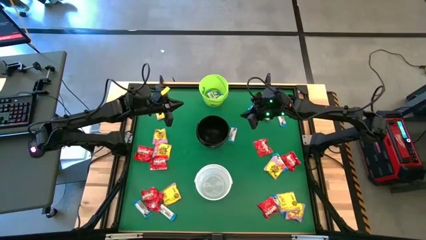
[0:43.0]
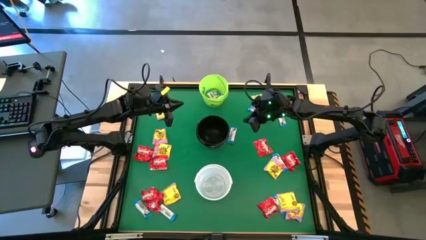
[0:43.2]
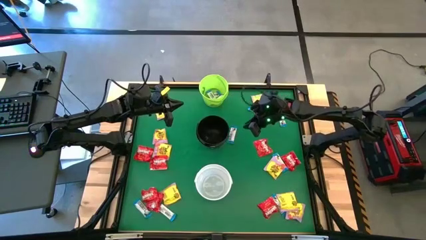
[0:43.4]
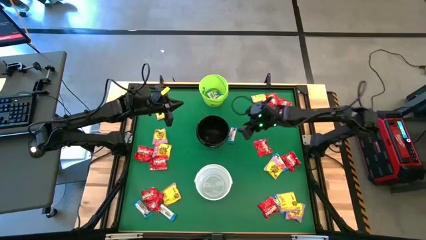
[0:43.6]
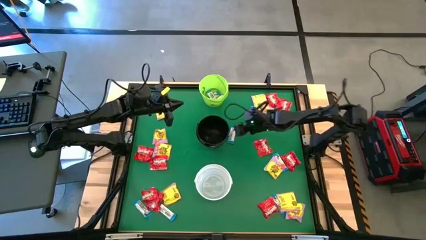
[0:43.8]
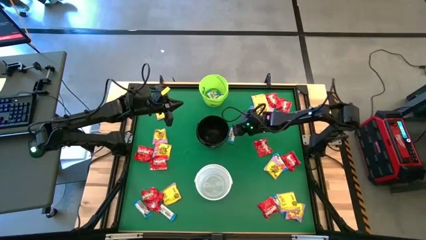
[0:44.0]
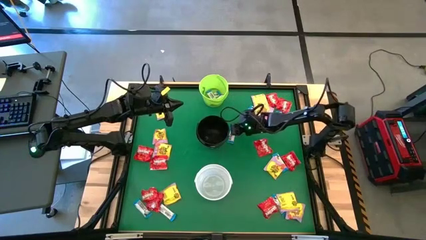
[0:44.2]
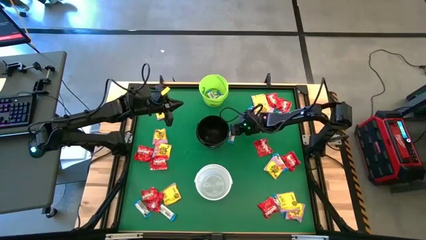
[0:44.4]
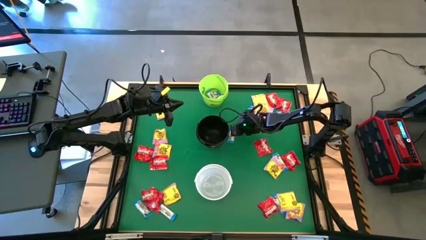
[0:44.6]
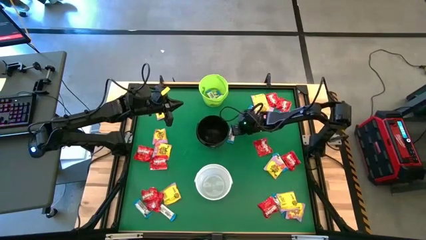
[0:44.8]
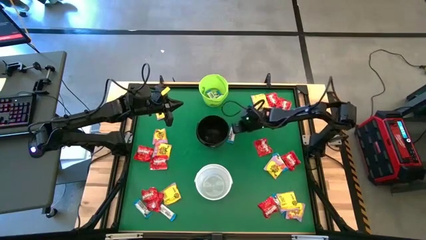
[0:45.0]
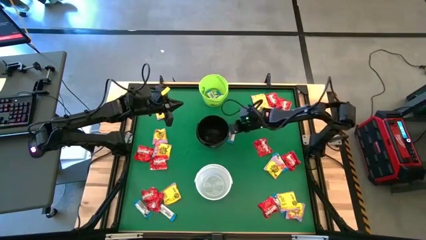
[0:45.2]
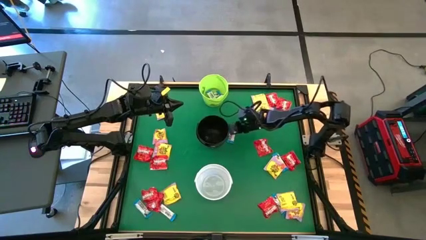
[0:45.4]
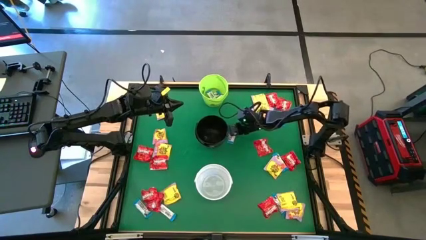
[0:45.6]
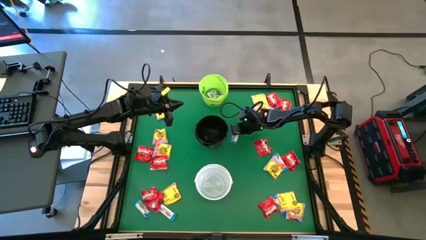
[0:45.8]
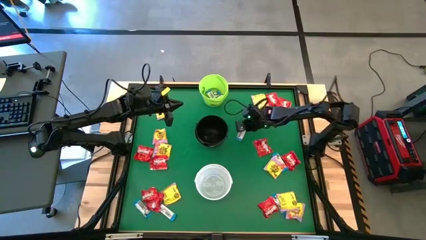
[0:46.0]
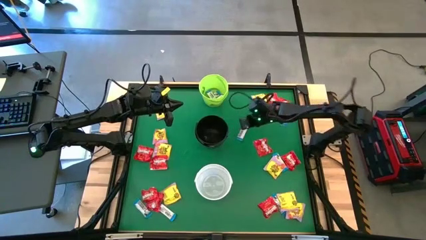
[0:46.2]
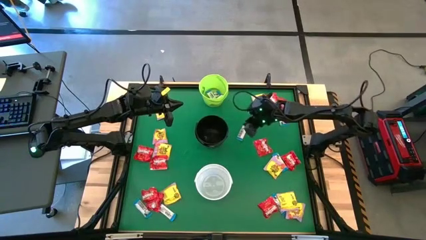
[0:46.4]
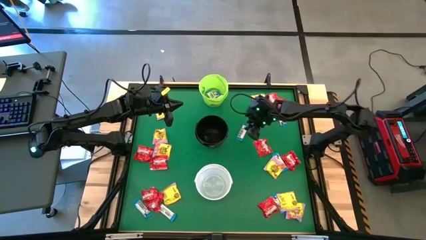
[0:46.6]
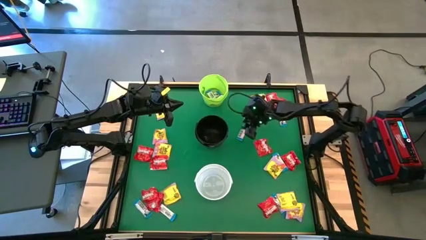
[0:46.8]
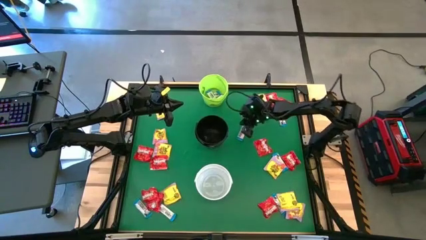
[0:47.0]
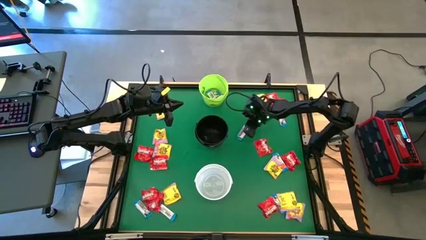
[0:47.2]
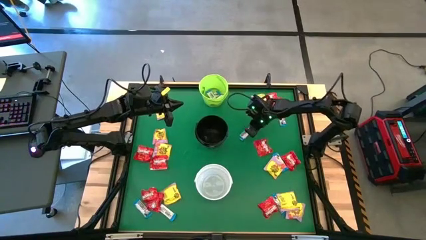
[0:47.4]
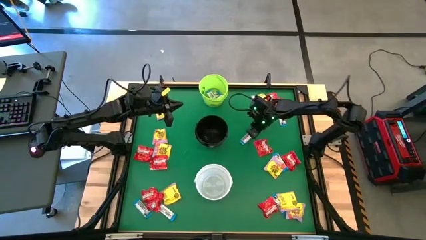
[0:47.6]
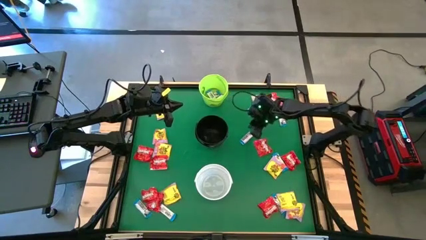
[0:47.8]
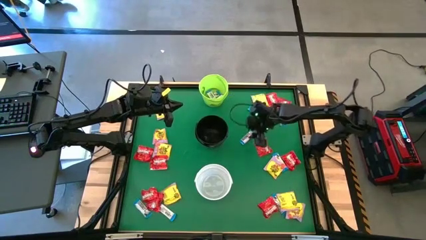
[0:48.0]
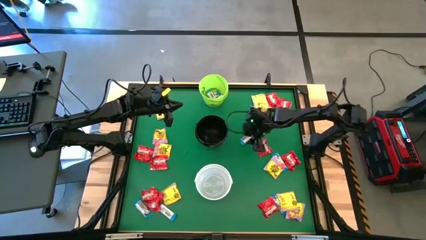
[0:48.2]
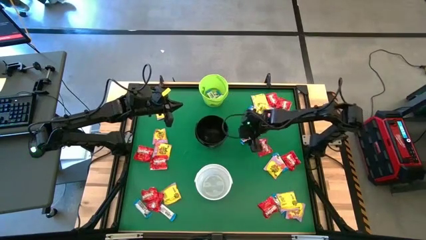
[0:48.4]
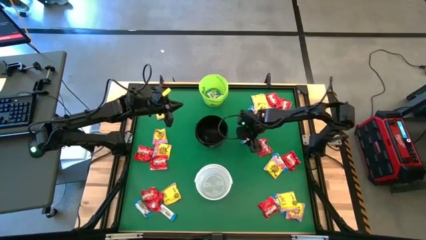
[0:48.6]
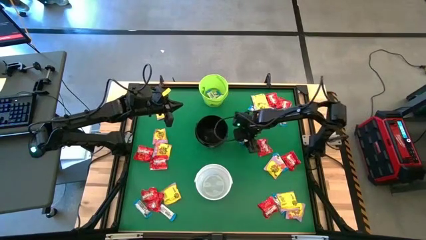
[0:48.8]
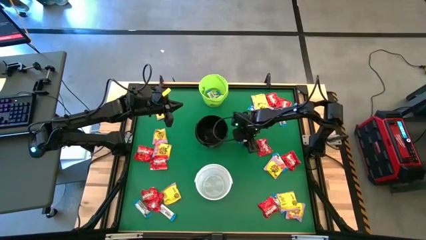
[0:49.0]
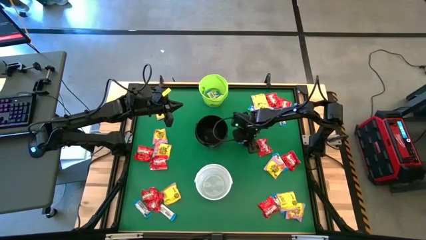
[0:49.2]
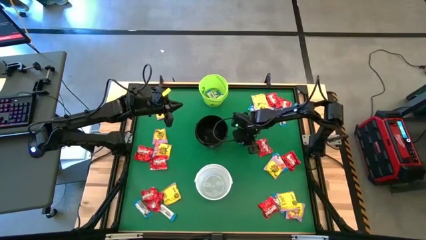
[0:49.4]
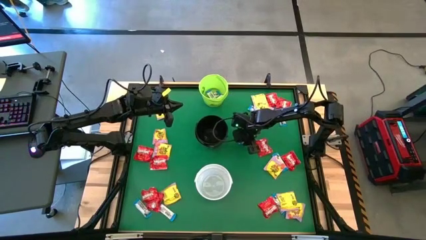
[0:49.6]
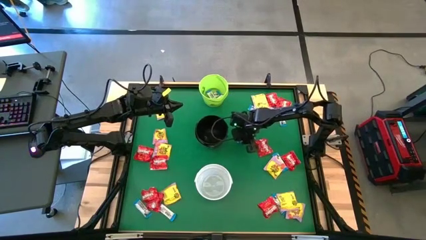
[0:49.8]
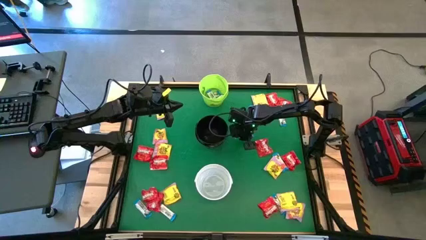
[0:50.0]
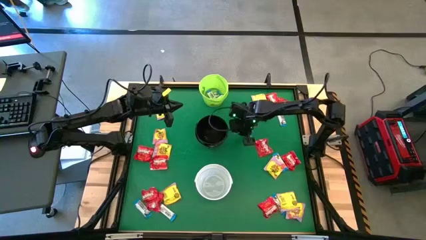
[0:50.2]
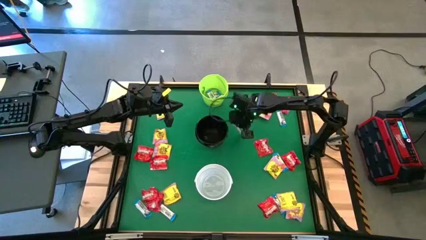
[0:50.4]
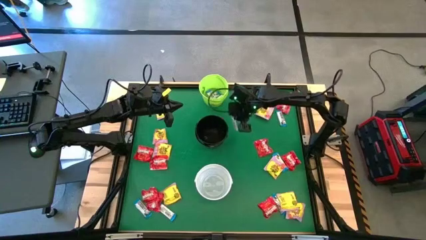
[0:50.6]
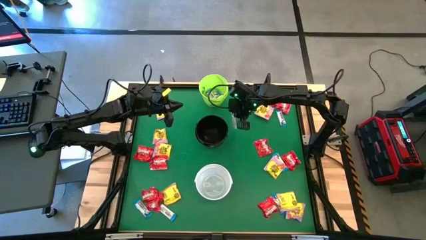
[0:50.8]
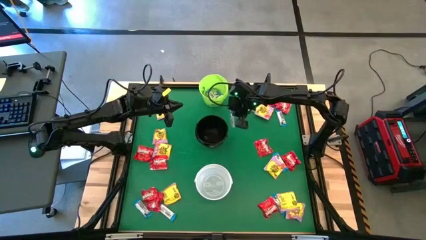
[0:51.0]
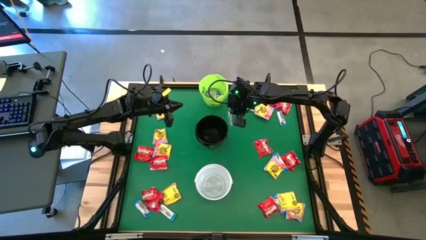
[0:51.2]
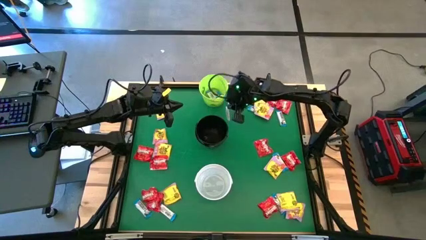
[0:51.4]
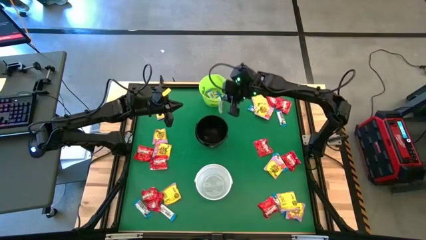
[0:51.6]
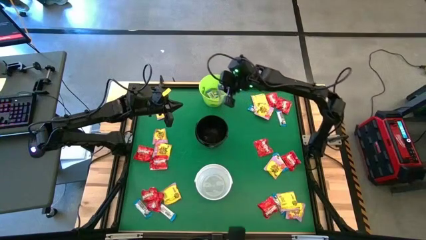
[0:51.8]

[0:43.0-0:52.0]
Task: Sort candy by brand, put in halloween buckets
Put the white chocolate into the green bucket

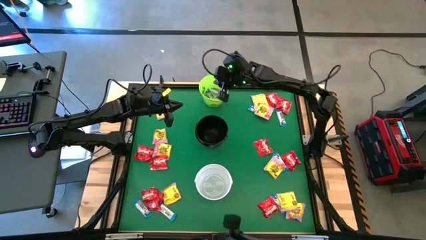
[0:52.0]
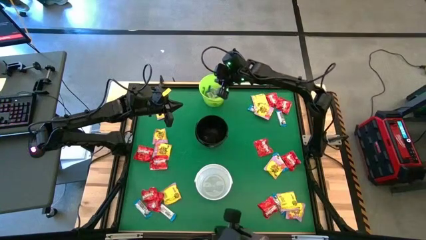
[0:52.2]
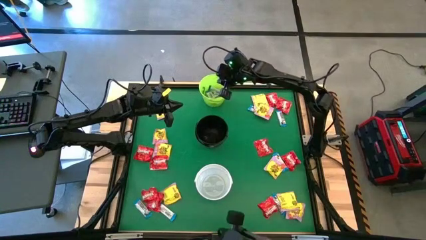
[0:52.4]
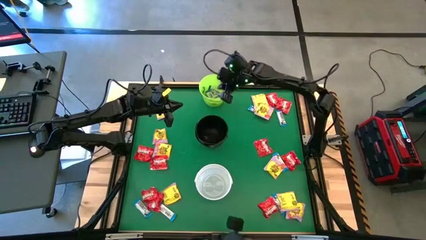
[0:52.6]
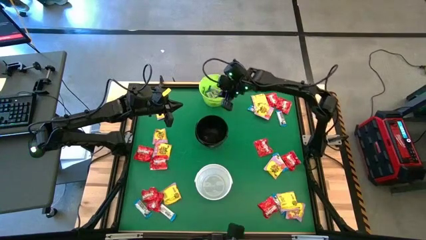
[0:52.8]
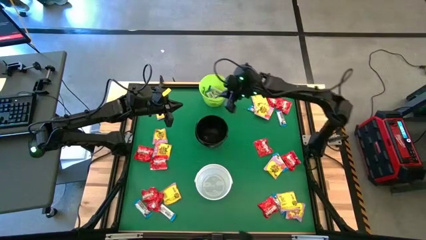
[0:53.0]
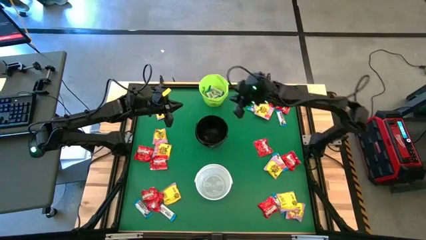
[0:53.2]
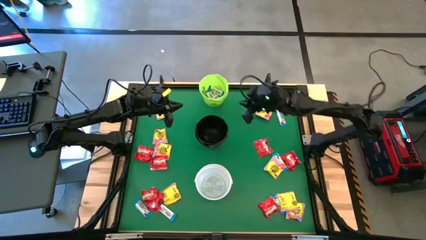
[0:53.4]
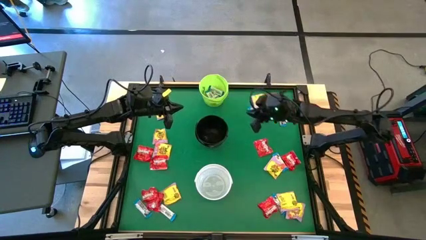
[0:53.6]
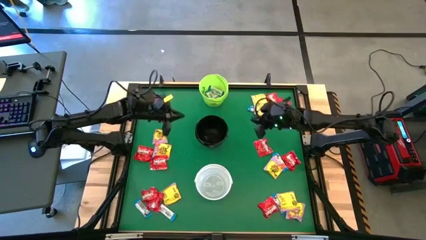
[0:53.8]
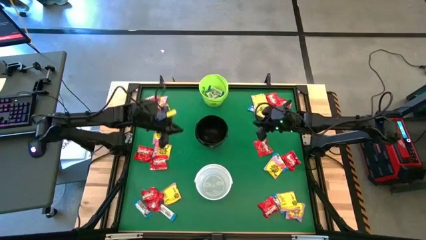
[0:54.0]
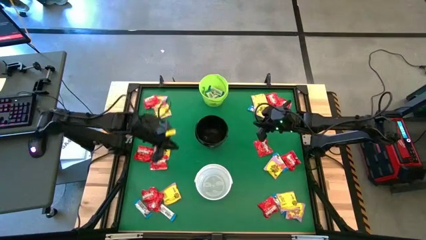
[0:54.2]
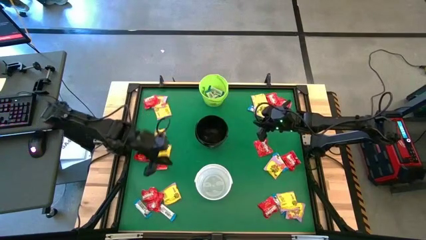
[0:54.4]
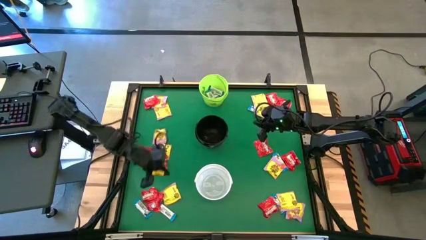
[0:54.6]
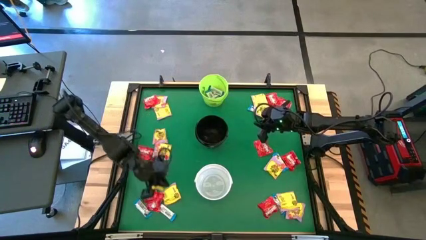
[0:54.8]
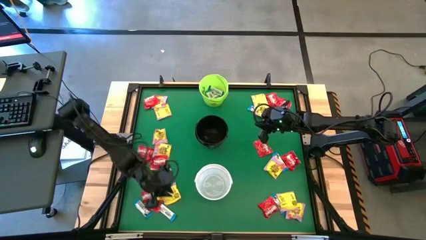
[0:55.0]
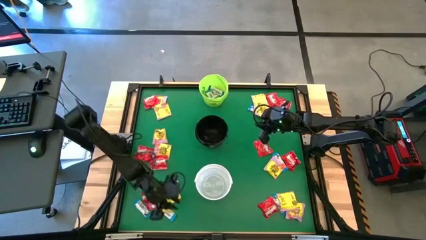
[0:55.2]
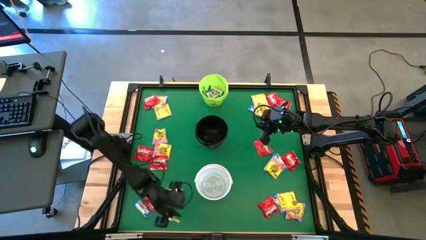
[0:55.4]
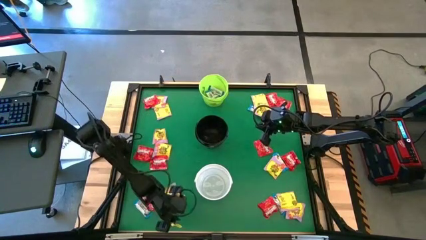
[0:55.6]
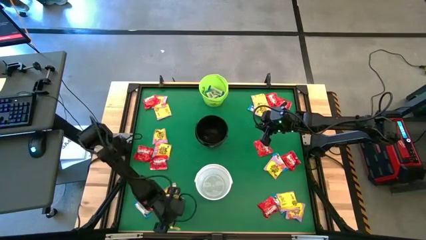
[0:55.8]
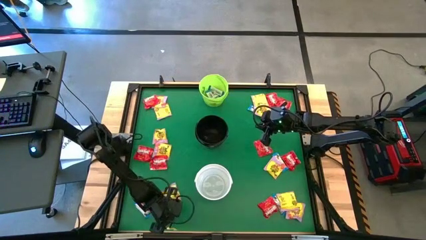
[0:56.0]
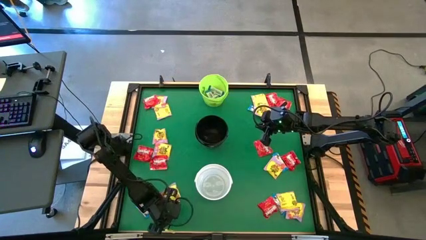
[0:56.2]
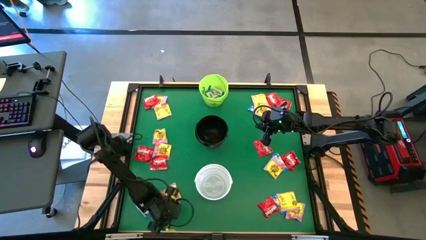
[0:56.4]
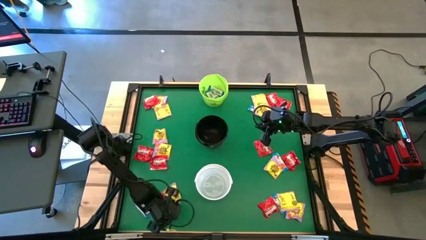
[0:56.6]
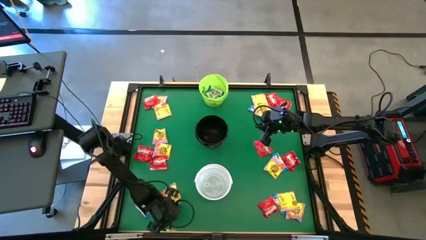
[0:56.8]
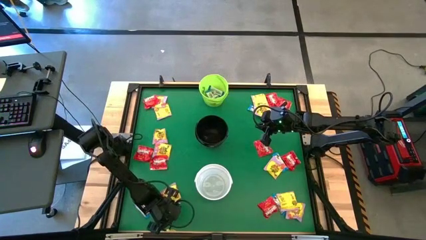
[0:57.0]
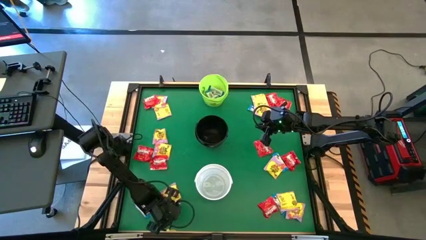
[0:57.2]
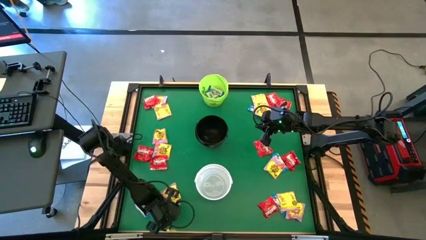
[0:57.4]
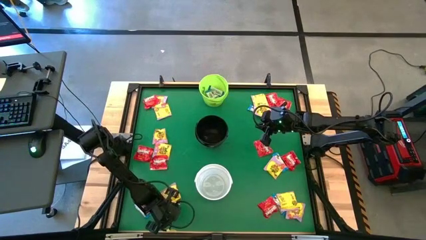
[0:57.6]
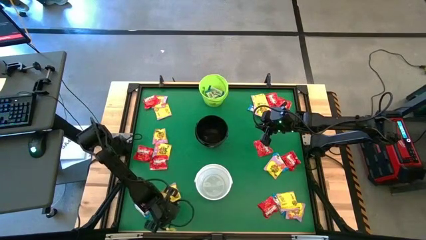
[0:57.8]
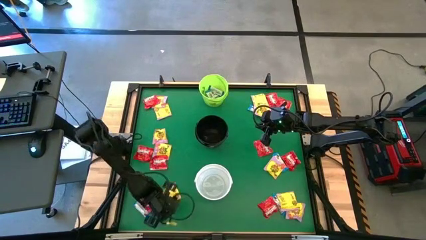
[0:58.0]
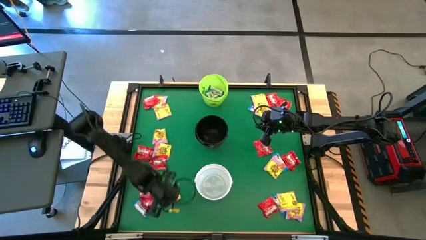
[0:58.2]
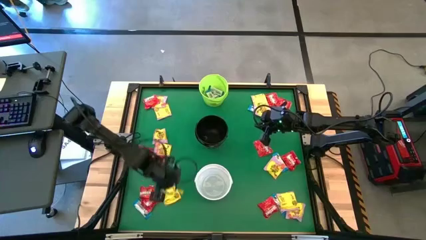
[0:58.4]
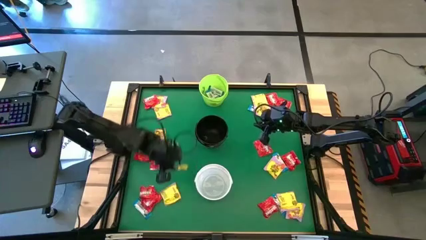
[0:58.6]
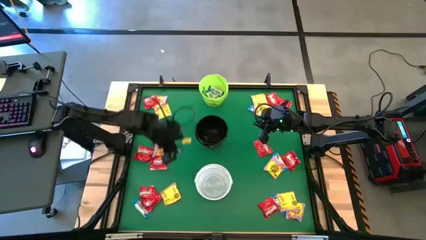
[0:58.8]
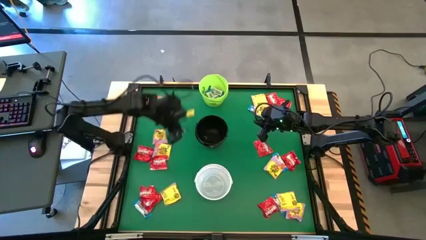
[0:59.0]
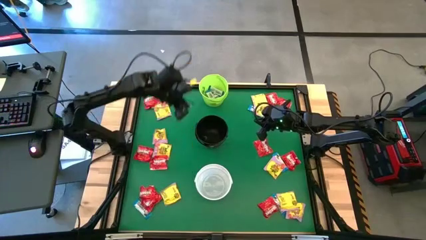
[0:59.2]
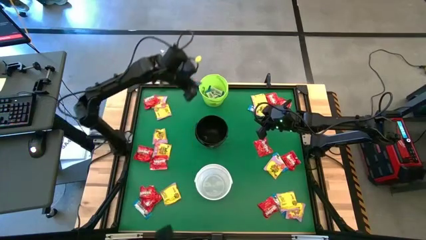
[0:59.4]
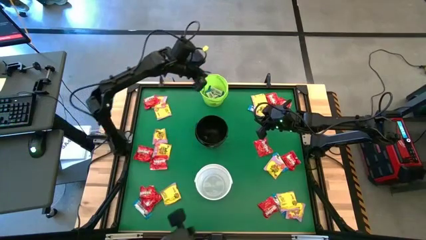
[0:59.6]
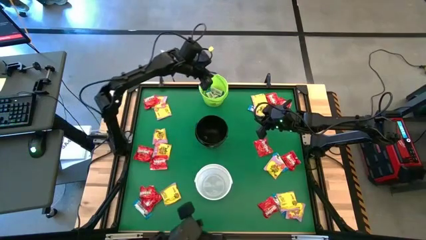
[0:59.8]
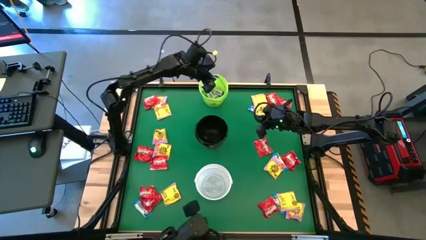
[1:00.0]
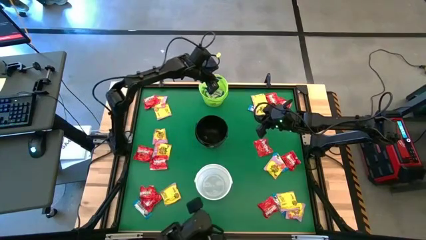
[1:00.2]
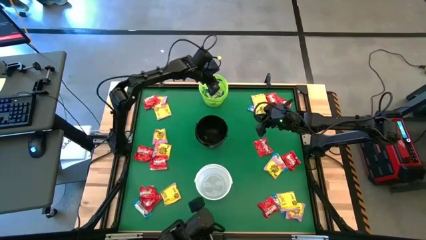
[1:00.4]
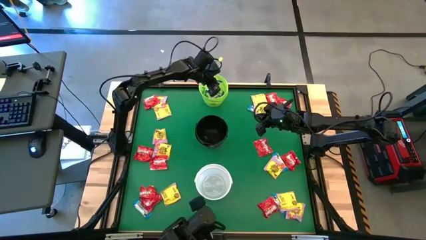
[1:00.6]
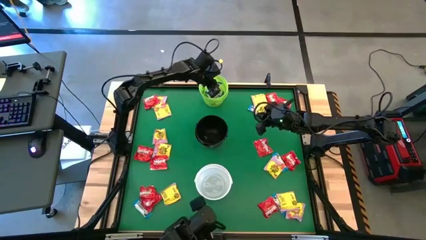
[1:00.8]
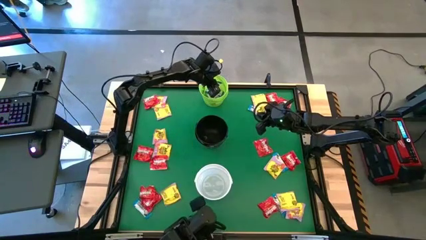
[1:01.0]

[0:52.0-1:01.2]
Put the white chocolate into the green bucket
